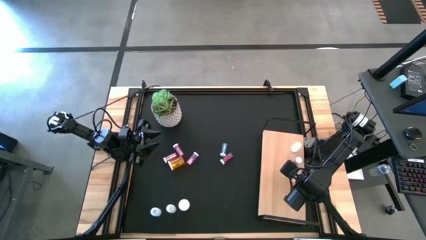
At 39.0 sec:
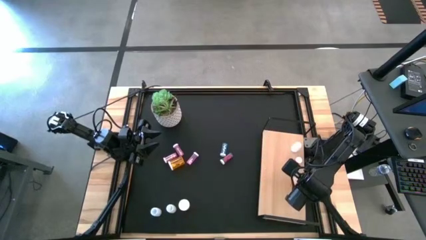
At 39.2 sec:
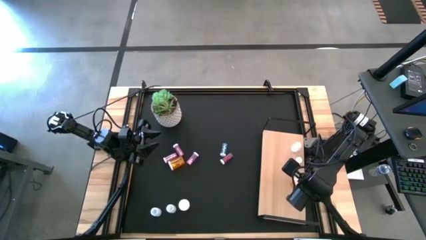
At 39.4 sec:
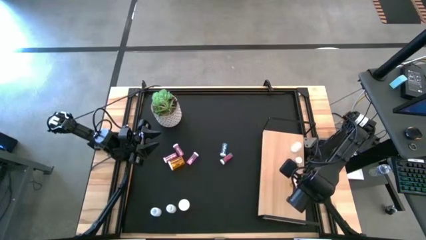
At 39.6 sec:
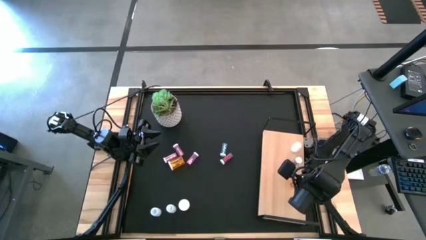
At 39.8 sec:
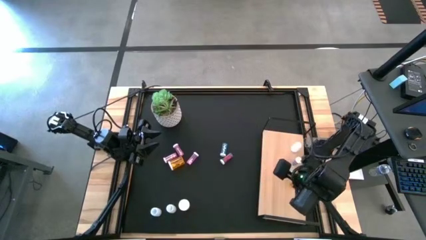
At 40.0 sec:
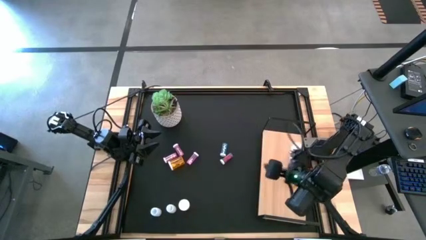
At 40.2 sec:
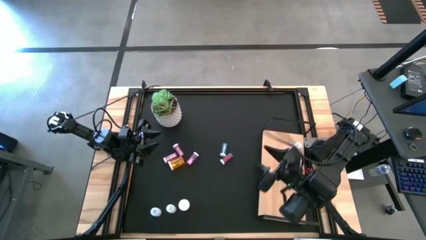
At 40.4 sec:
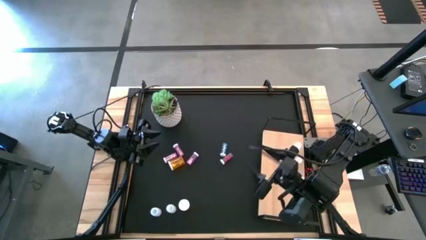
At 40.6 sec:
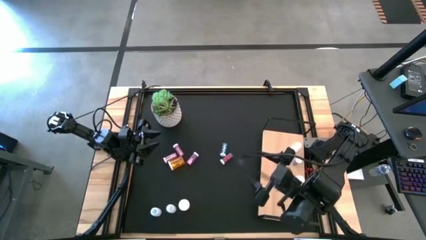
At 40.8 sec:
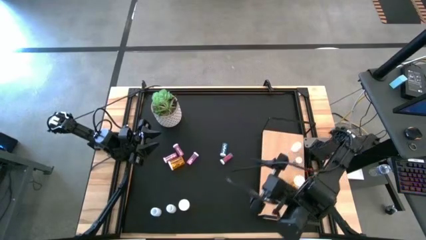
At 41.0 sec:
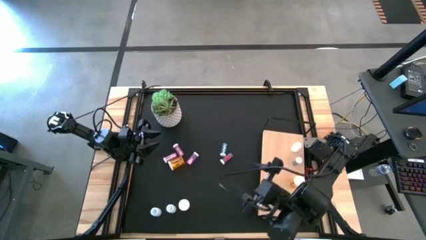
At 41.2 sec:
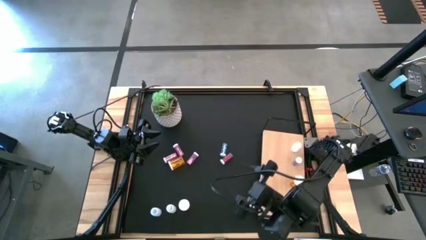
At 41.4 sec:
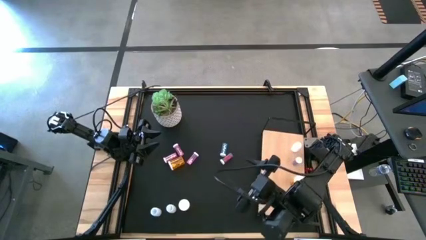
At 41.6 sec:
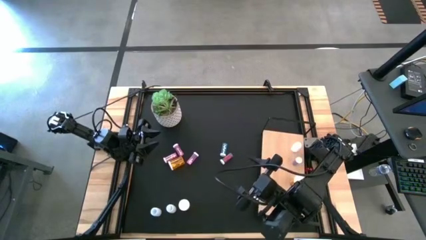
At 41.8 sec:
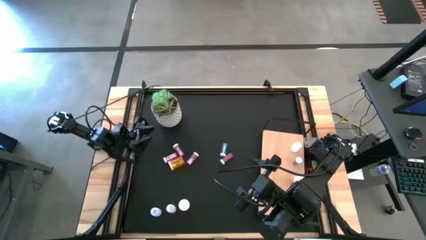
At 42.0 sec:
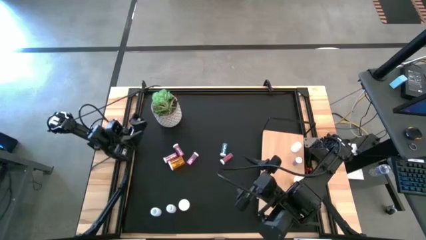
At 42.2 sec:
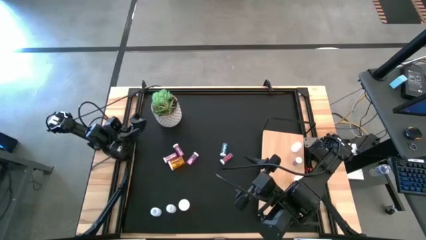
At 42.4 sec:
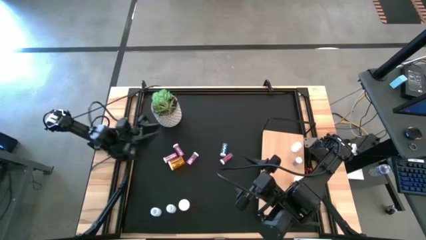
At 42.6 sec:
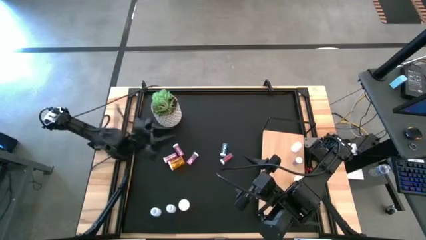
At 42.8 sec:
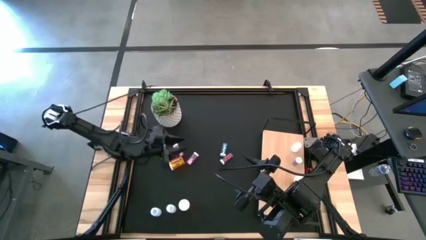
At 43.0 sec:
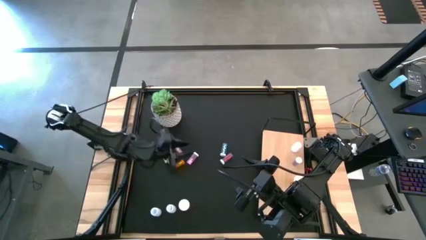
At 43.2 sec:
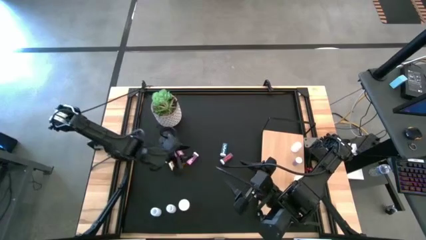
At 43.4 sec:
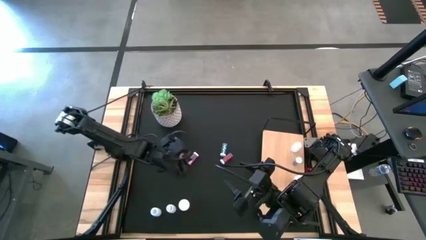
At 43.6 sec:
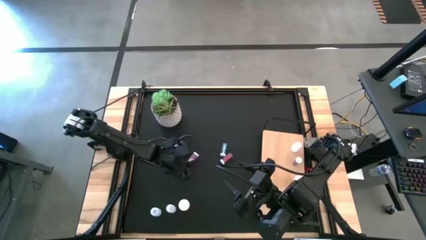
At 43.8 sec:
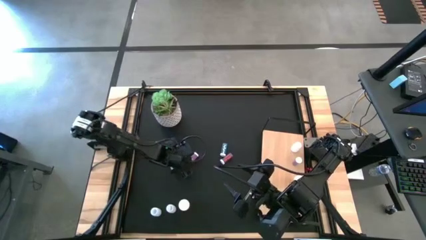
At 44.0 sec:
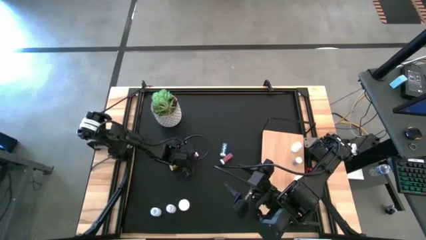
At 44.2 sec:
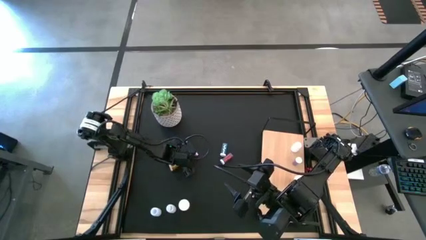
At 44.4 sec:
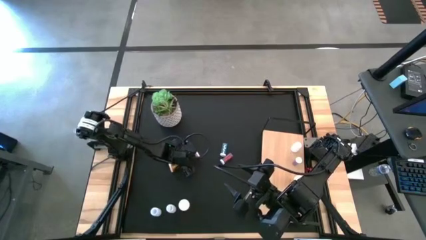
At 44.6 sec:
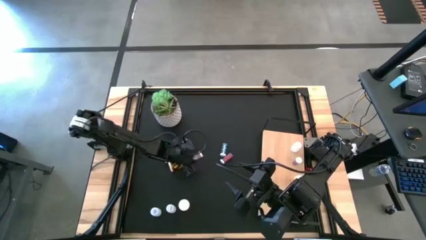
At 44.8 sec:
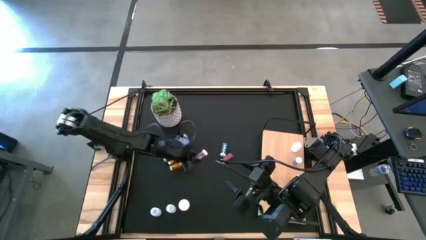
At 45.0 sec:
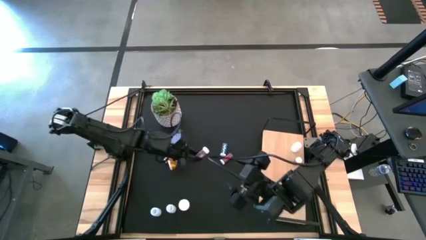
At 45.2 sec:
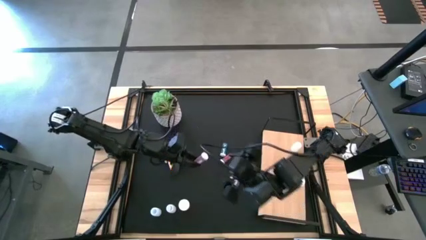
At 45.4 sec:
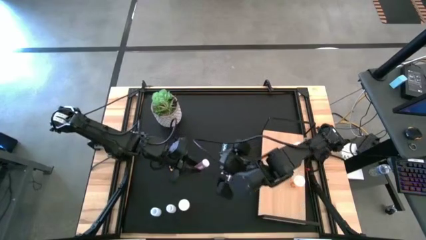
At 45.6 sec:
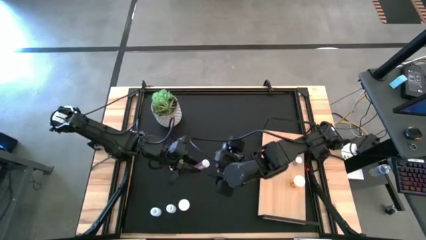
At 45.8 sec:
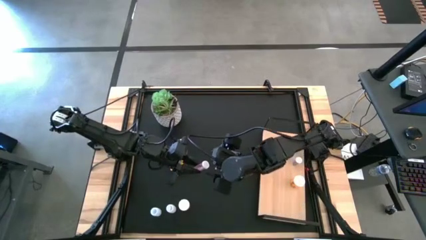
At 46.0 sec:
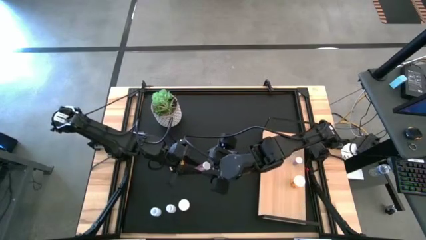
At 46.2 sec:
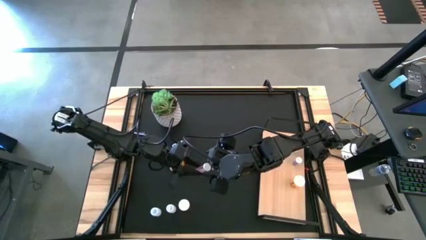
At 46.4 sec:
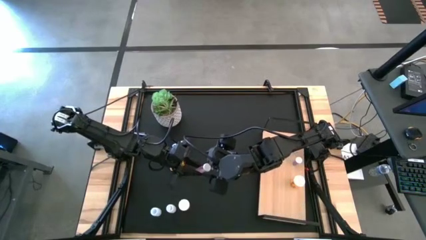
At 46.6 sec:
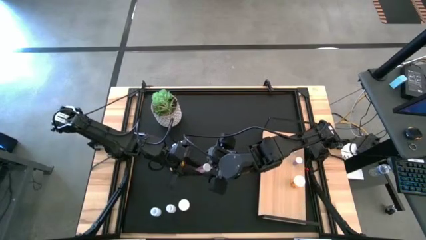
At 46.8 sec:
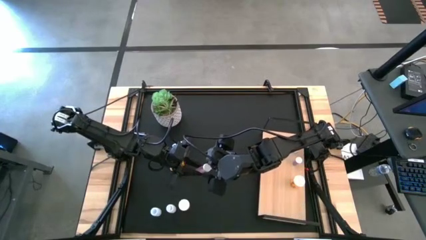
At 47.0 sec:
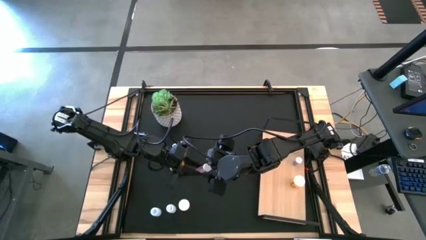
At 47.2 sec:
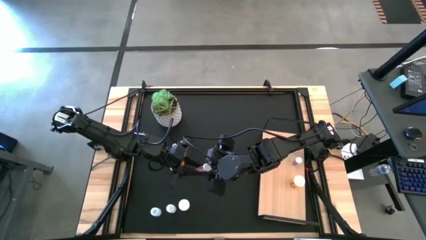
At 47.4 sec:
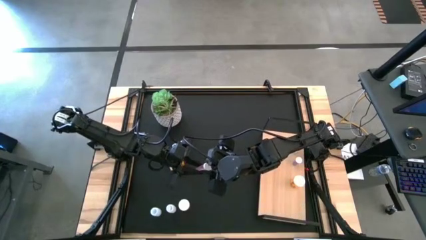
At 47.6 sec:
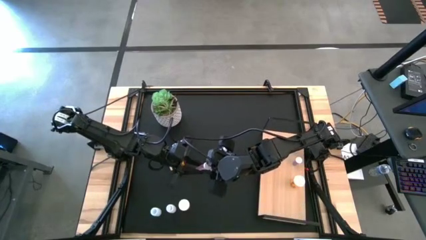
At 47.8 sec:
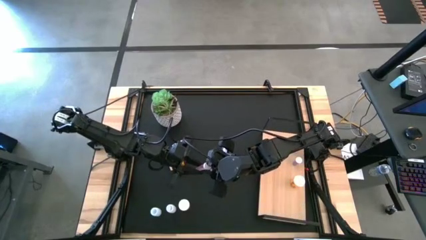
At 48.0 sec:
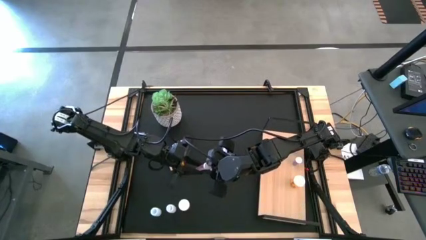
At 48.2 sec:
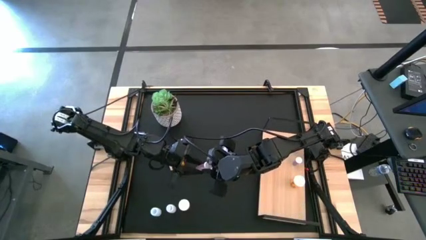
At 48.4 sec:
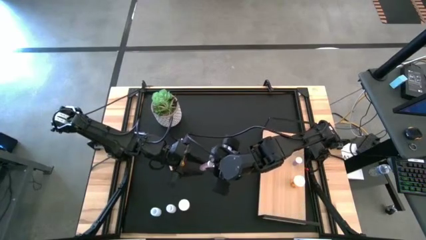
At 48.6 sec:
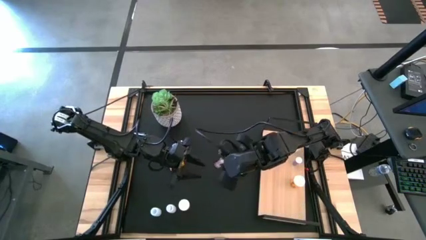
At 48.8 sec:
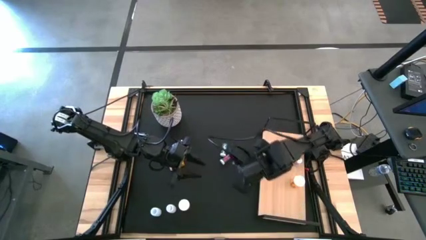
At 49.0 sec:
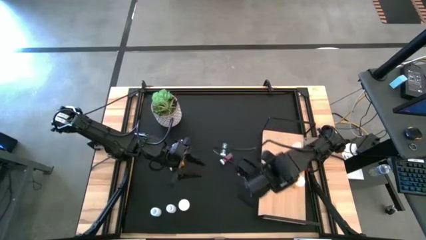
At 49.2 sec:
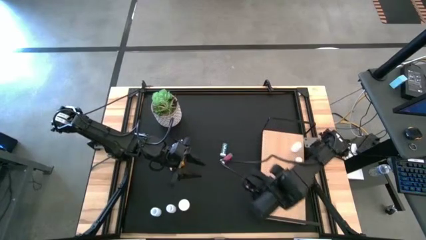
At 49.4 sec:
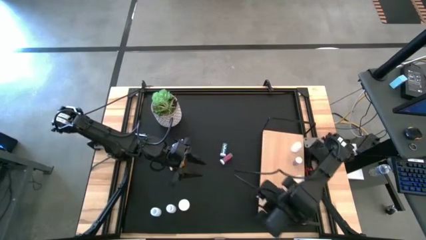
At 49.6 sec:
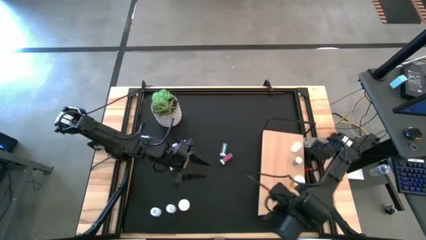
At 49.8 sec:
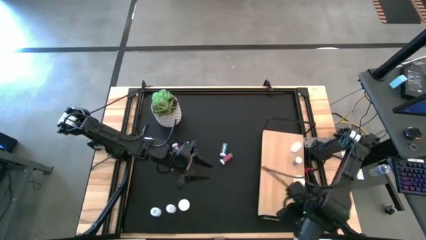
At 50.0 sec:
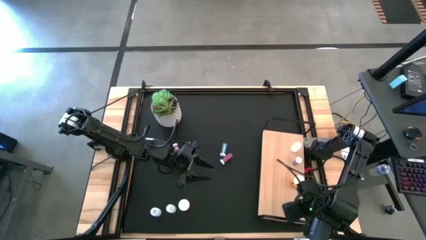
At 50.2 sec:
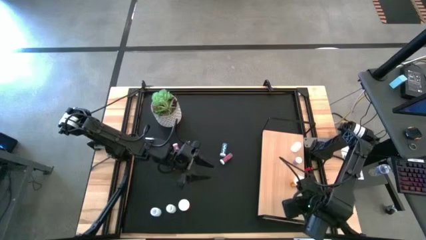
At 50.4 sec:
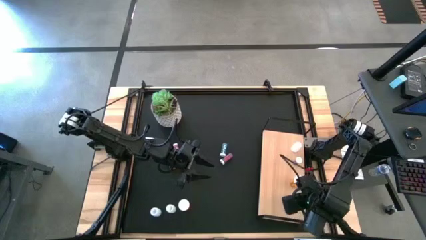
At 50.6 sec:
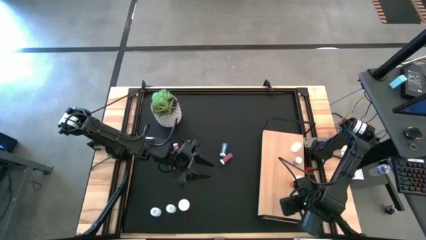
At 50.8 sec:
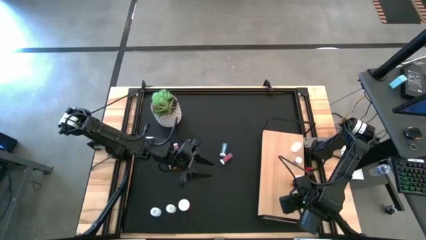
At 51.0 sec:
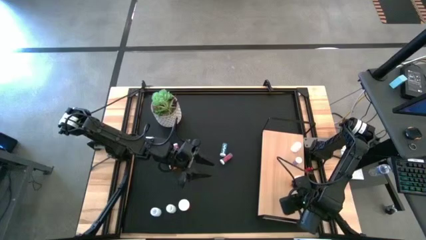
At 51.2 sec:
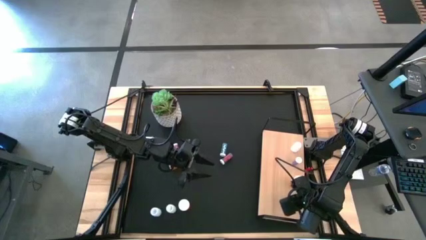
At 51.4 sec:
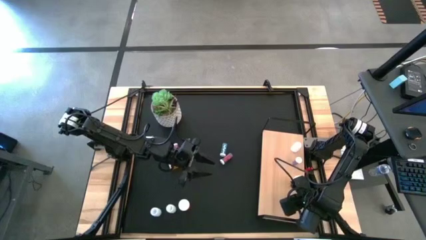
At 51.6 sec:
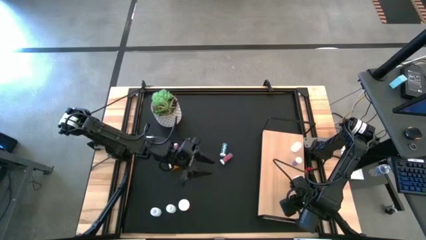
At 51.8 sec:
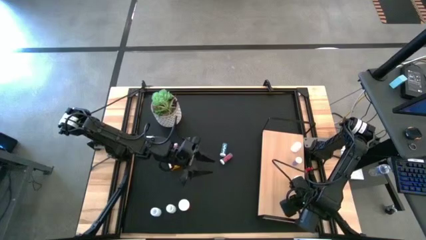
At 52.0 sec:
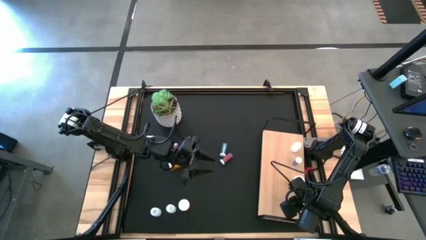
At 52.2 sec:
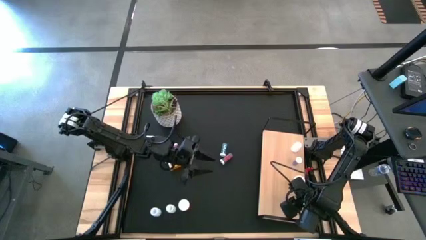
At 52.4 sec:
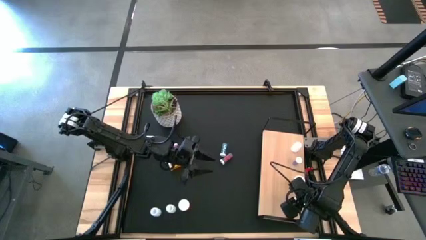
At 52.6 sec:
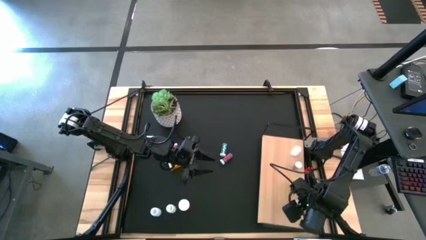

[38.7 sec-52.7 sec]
Task: Pick and place medicine bottles onto shelf by color
Put the right pink tablet bottle on the shelf

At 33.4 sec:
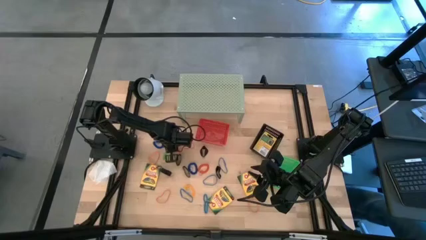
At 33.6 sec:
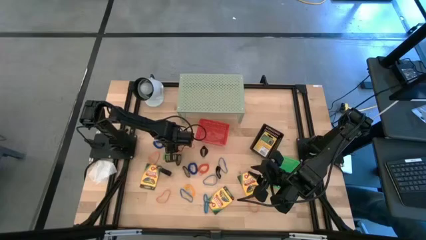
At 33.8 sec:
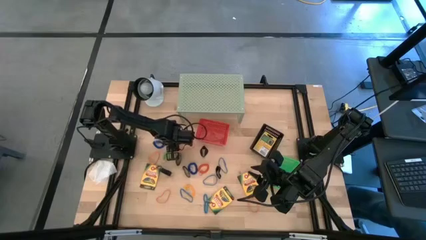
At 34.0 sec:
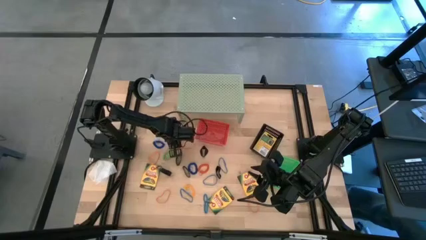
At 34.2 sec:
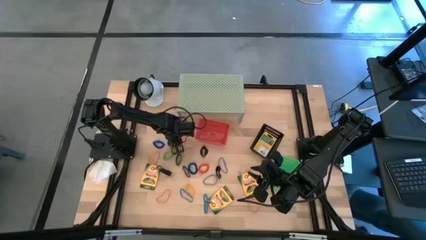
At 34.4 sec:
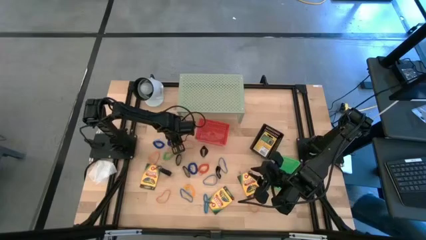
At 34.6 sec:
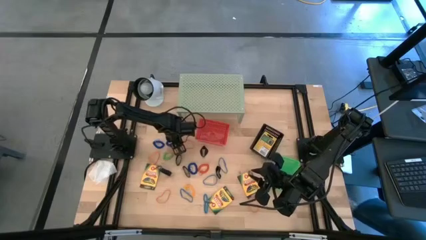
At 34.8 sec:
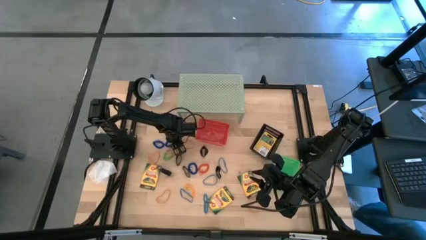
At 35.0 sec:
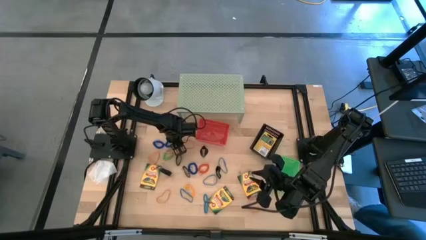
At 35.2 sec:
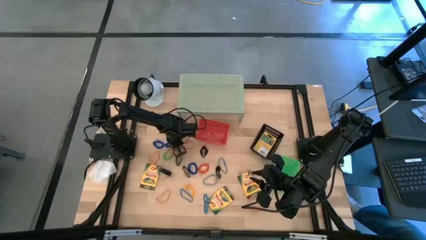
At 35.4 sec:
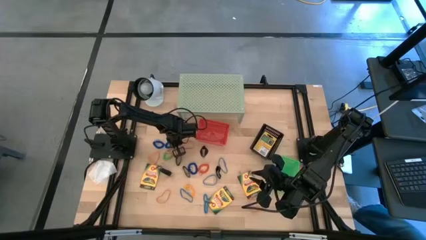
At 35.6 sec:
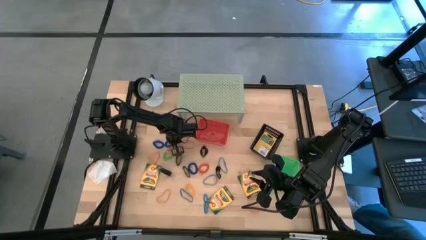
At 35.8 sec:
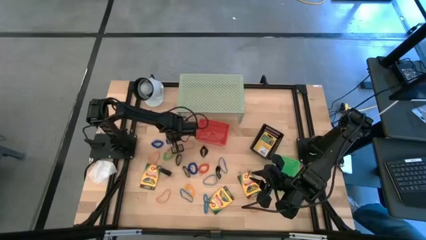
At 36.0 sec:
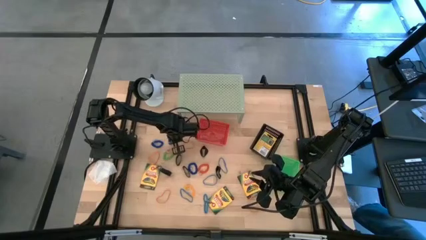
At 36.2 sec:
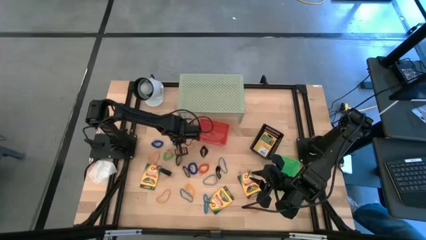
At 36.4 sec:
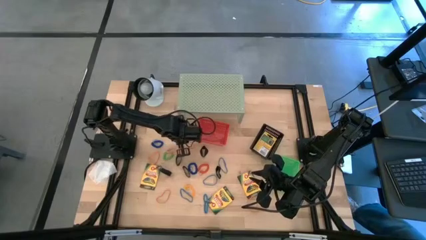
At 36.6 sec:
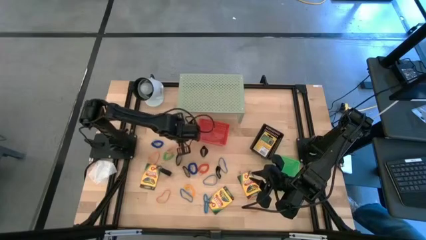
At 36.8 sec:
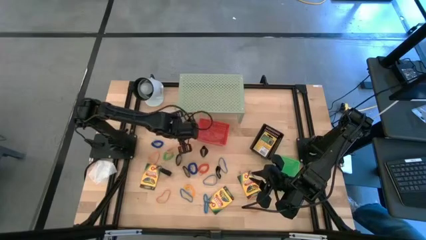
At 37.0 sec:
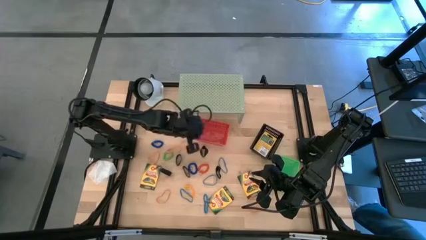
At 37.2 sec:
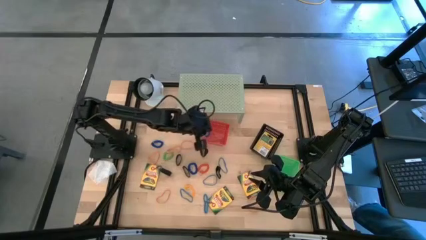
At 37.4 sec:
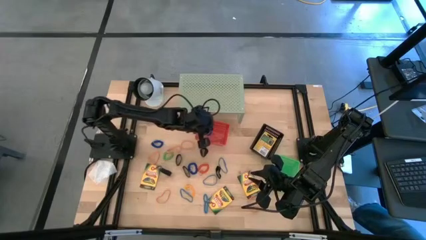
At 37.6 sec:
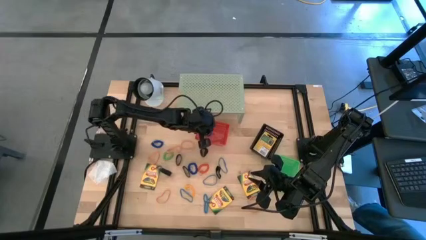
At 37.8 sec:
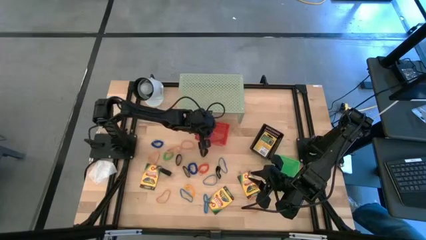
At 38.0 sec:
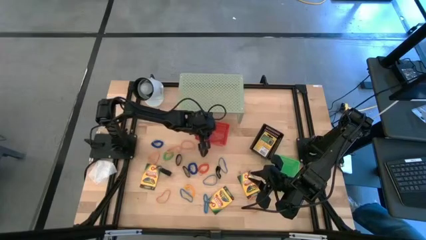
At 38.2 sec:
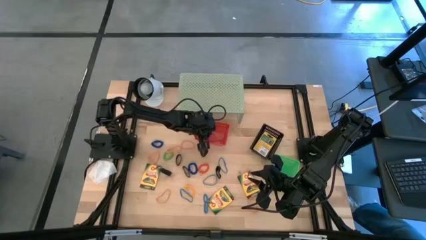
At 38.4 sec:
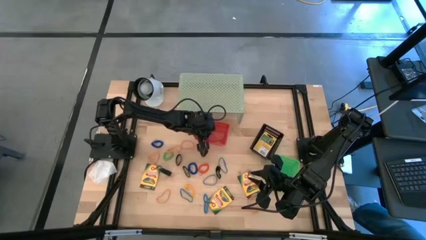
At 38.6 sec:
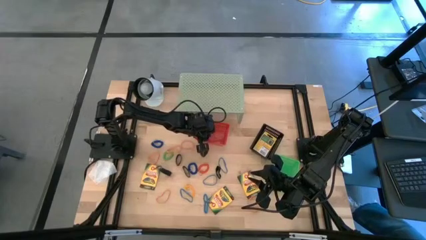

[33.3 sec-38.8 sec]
Task: Pick & Place Office Desk Supplies
Put the blue spring keychain into the red bin
